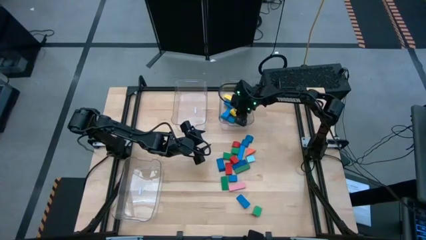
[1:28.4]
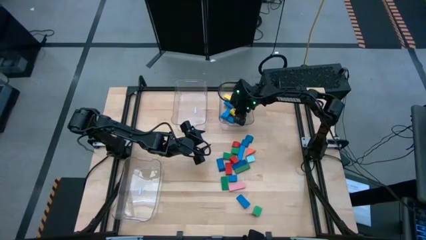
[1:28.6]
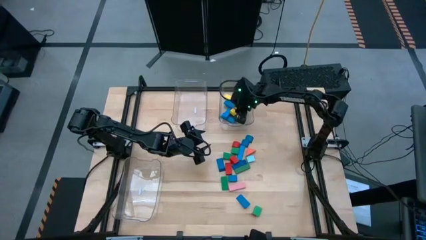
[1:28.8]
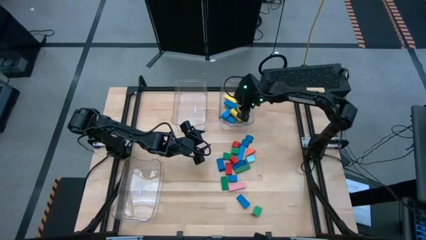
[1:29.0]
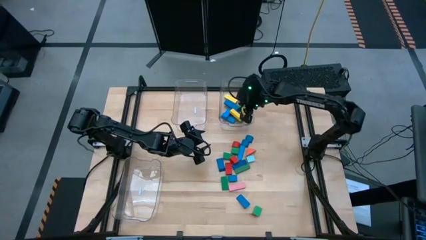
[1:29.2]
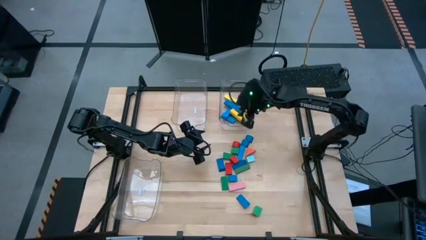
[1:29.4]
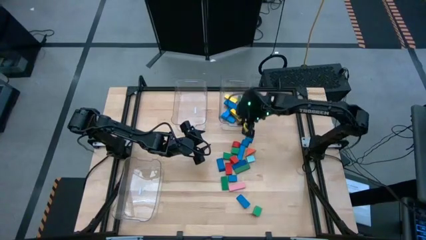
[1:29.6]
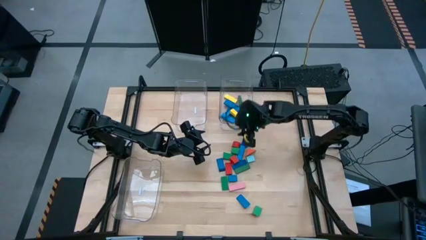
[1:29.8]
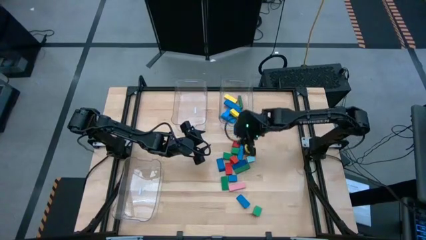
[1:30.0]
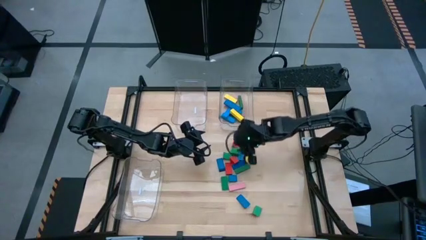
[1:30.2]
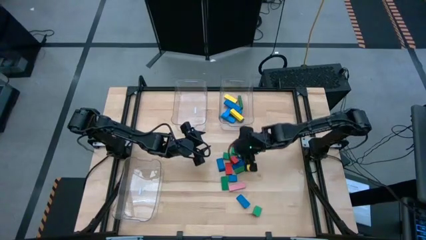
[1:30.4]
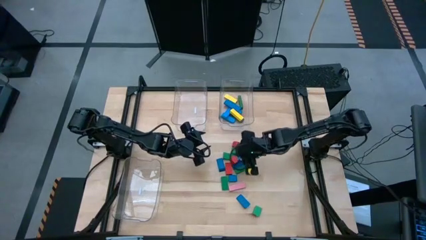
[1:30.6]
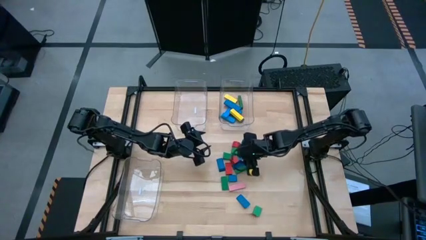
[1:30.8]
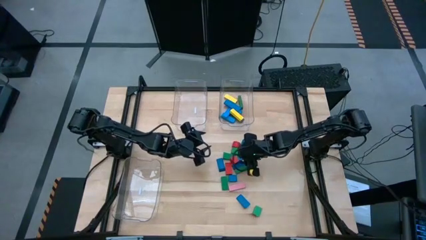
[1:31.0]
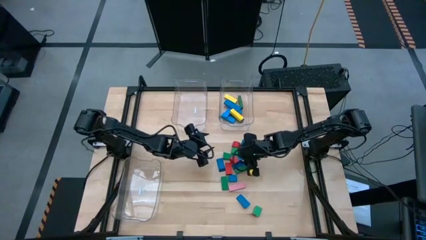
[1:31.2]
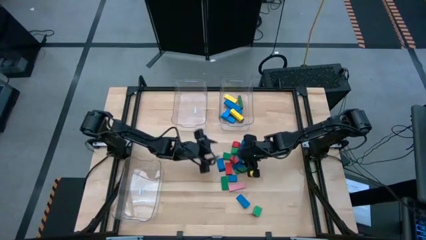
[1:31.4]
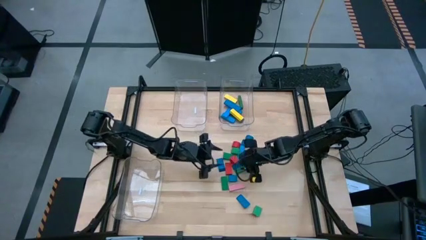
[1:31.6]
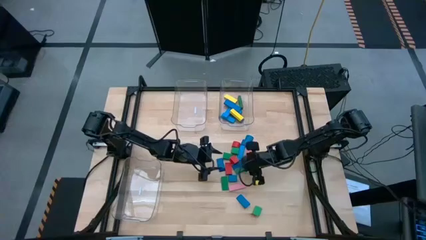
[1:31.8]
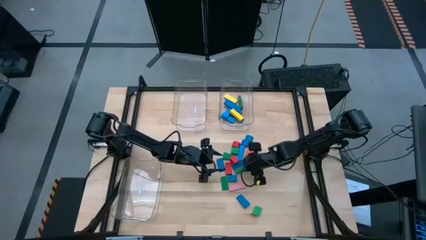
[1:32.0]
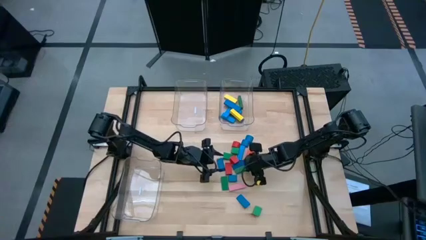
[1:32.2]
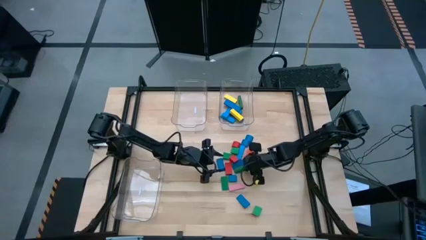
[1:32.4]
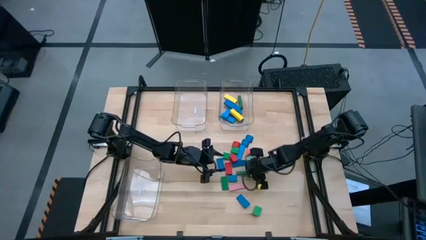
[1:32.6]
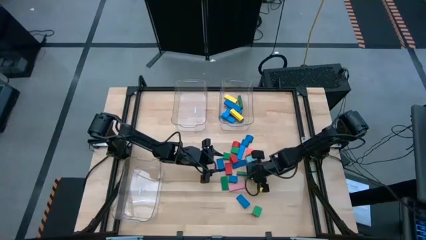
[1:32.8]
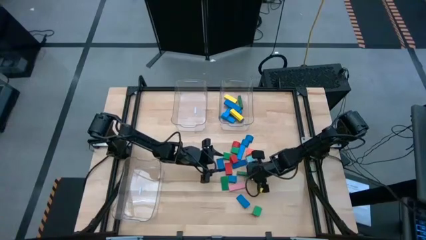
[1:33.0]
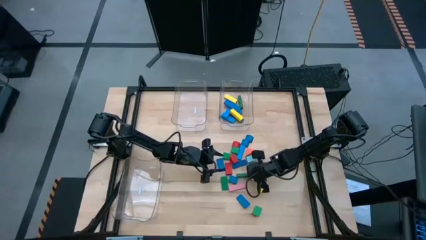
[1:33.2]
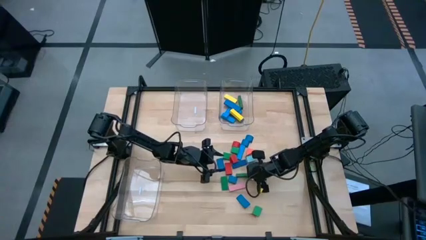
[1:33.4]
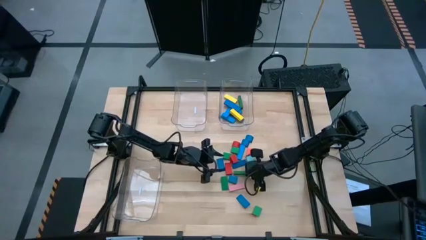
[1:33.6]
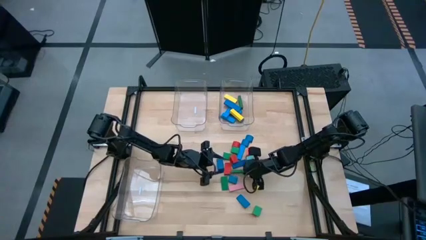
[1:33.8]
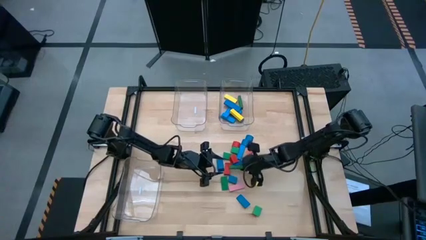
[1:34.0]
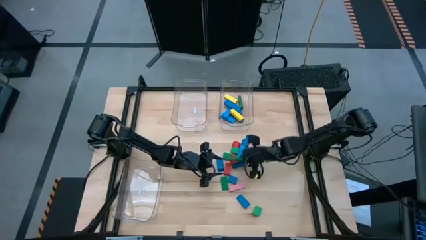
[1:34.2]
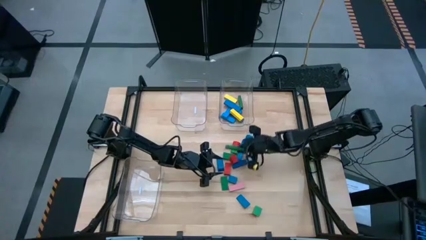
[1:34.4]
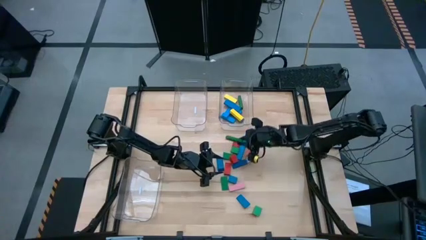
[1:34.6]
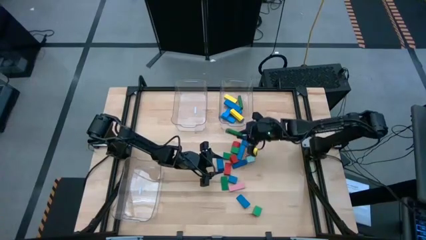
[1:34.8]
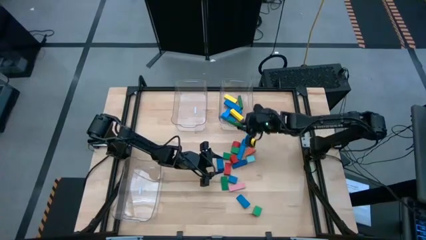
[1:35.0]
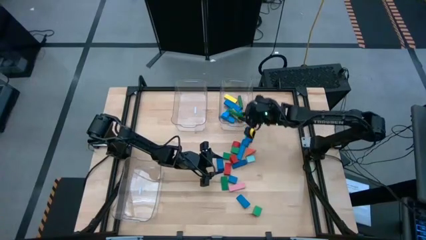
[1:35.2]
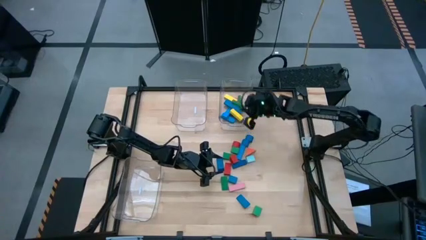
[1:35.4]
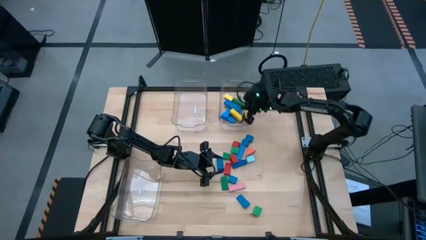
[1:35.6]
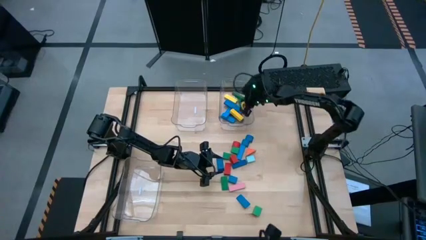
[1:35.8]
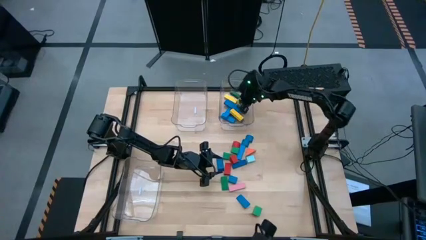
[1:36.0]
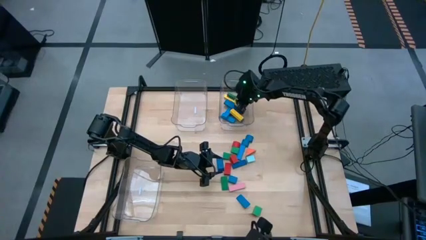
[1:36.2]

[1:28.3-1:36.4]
Task: Sort blocks by size
Put the green rectangular block into the top right transparent bin

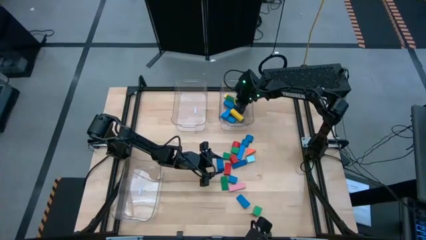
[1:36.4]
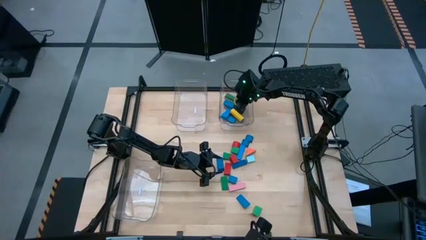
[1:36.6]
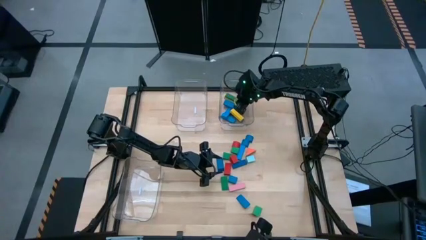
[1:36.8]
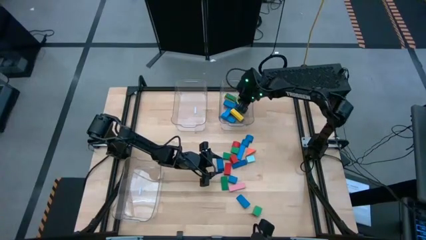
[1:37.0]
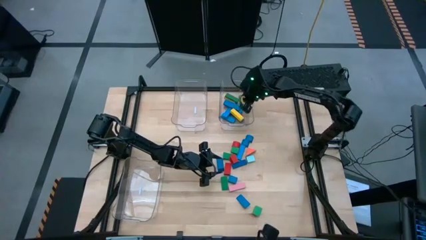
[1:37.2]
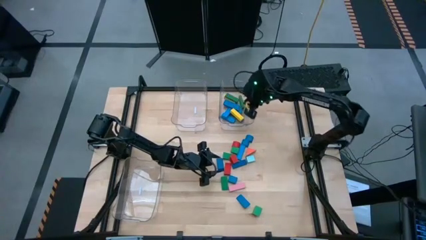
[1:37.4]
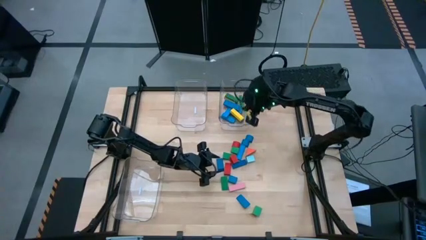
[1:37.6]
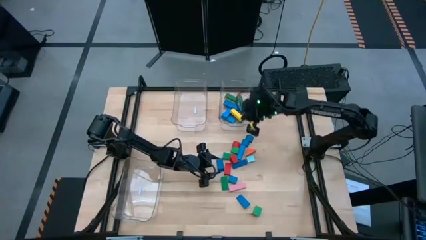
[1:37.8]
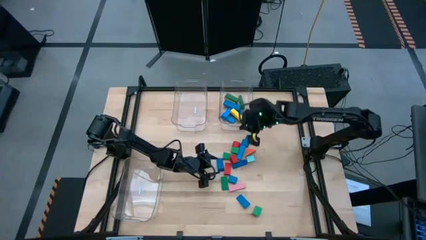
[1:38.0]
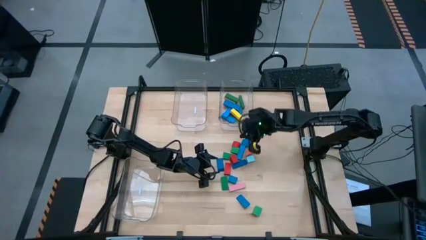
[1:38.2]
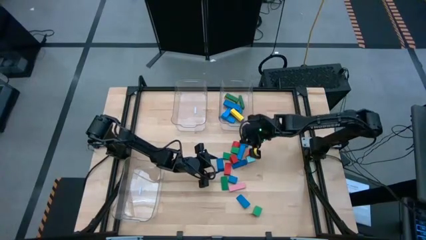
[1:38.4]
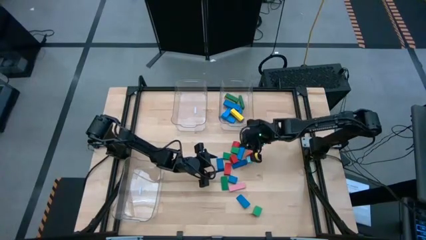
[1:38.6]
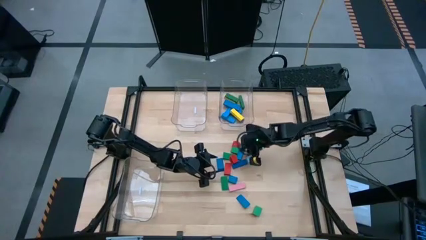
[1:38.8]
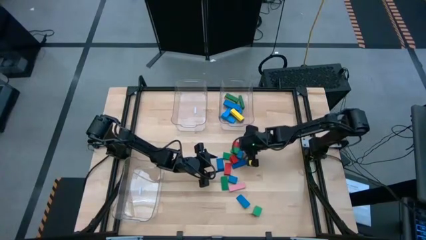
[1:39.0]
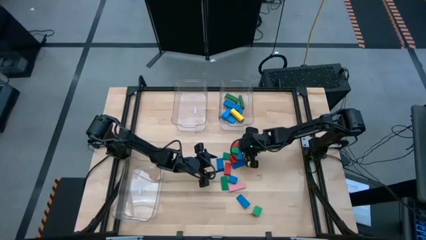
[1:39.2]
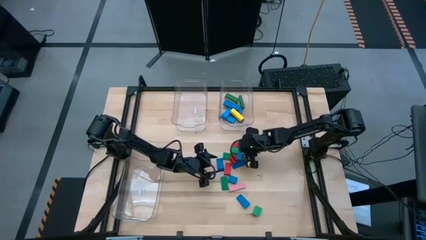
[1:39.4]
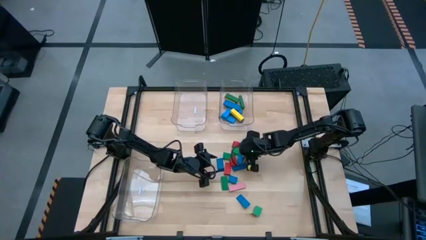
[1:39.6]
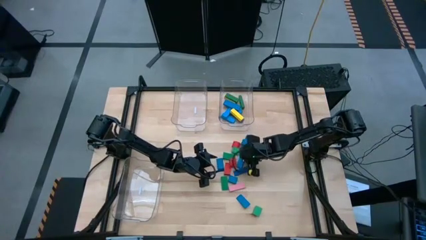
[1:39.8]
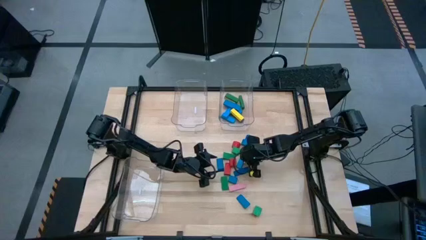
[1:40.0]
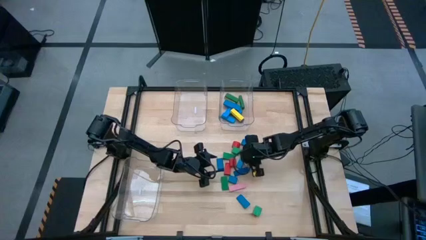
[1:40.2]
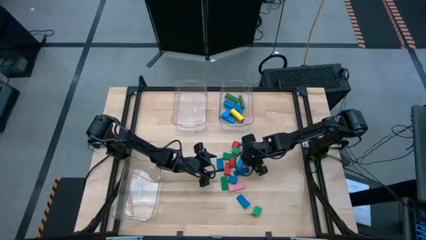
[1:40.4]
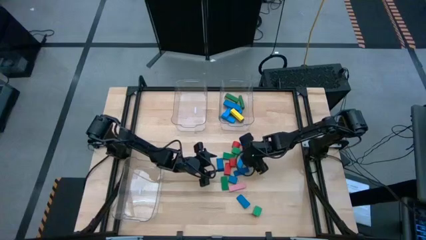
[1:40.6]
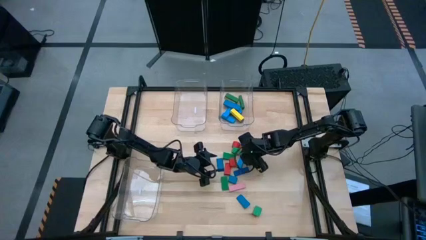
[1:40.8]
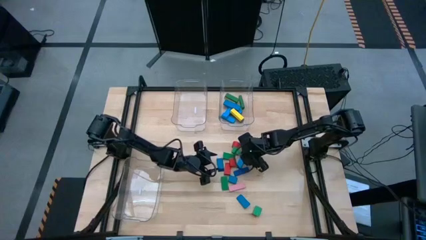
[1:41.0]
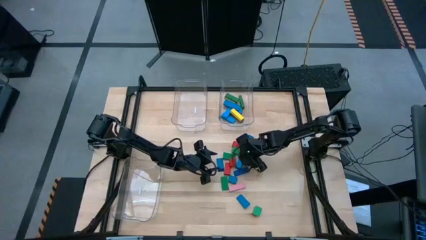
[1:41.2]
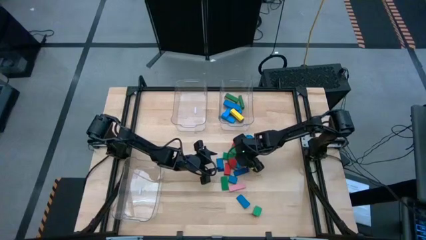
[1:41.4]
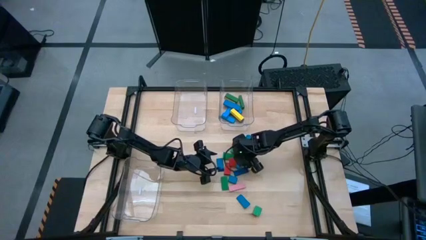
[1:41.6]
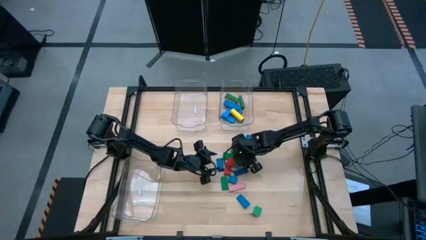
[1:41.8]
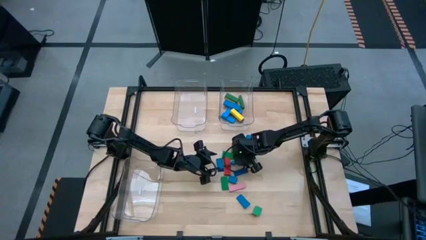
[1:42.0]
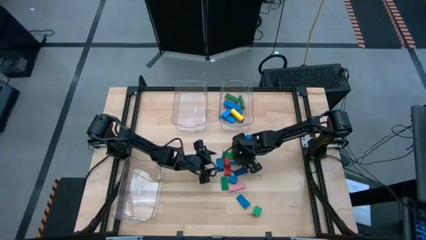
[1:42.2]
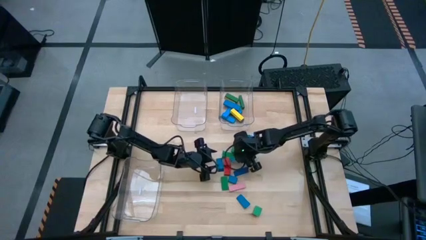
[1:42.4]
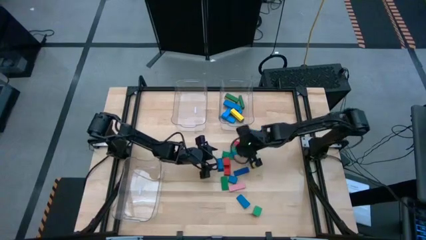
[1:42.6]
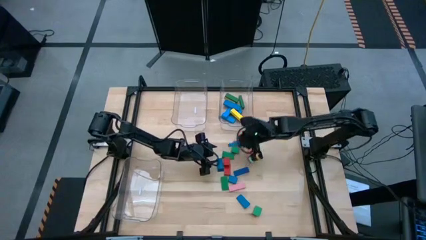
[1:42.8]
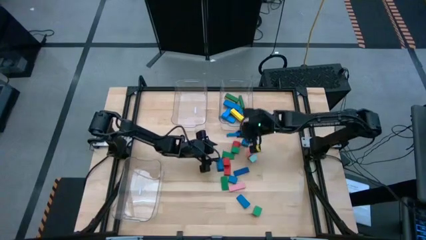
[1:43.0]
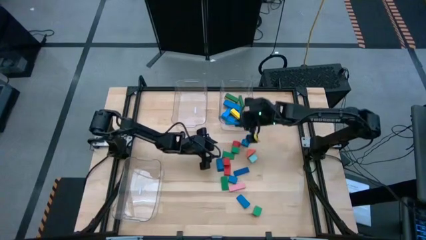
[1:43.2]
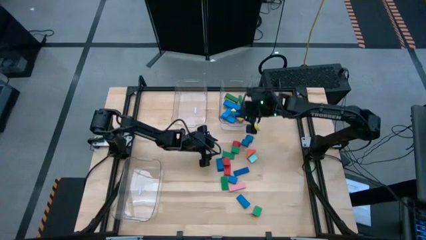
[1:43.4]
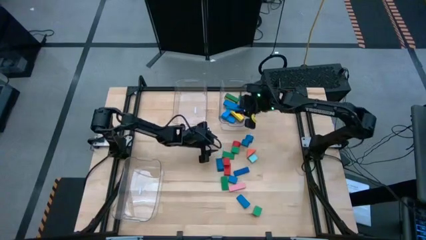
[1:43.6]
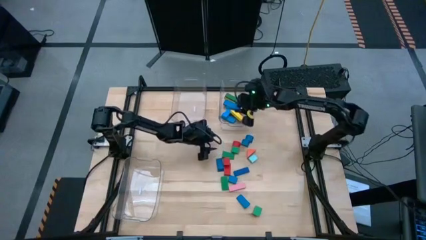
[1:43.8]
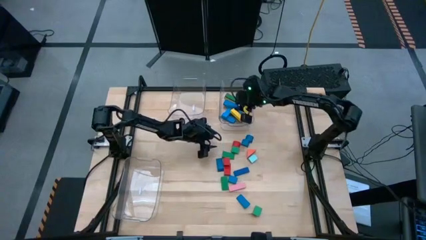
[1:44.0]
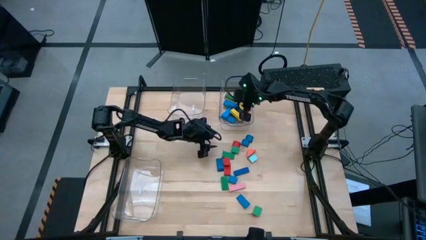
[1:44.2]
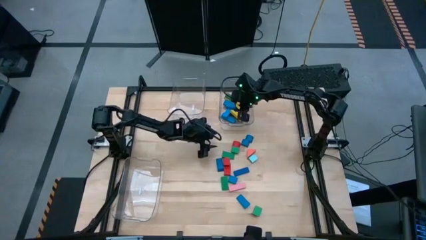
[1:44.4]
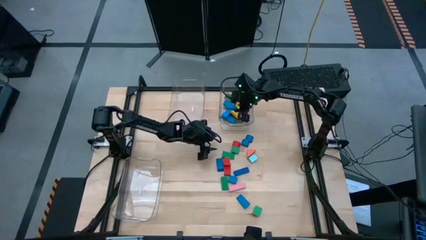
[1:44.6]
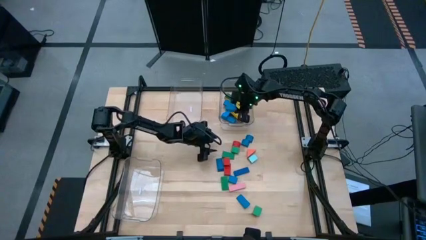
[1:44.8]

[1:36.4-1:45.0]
Put the blue rectangular block into the top right transparent bin

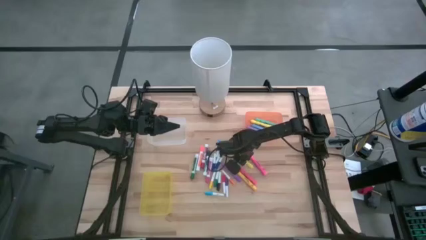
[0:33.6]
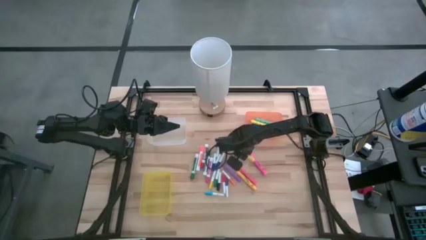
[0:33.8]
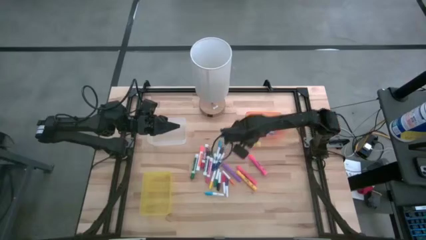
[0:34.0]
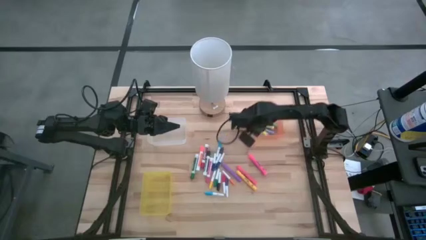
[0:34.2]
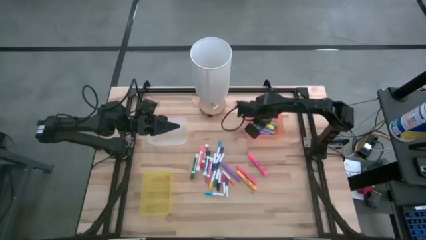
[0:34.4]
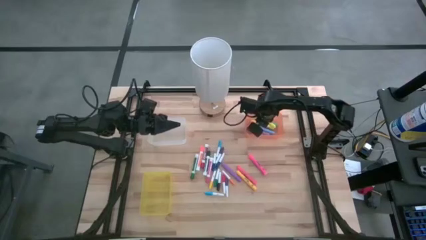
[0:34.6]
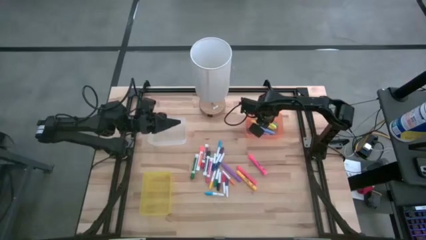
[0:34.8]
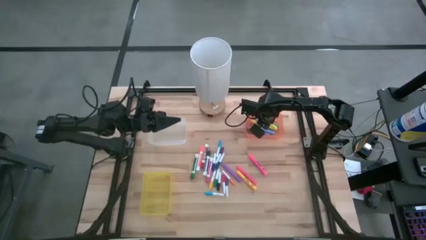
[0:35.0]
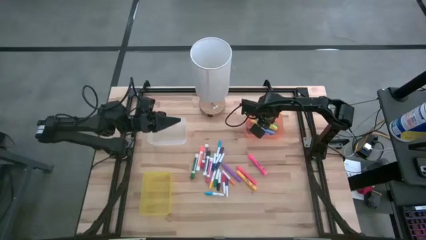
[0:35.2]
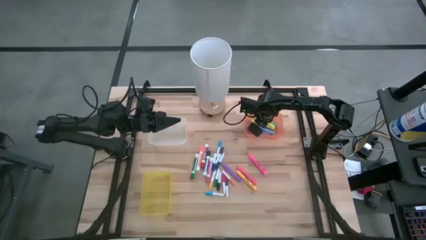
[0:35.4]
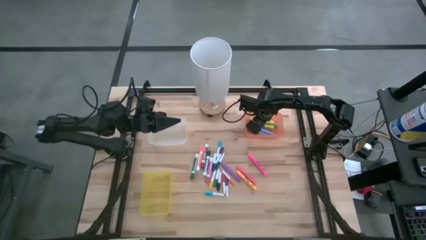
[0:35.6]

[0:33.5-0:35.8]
Task: Pick & Place Markers
Put the light yellow highlighter pen into the orange bin
